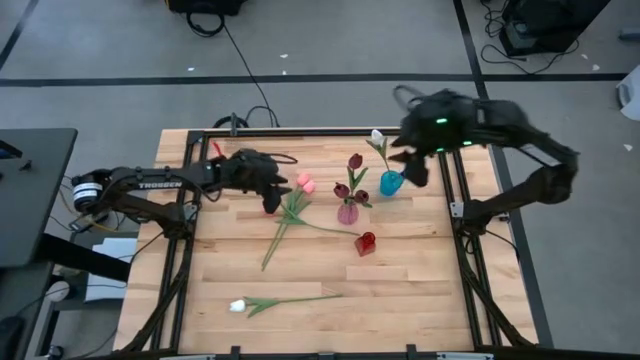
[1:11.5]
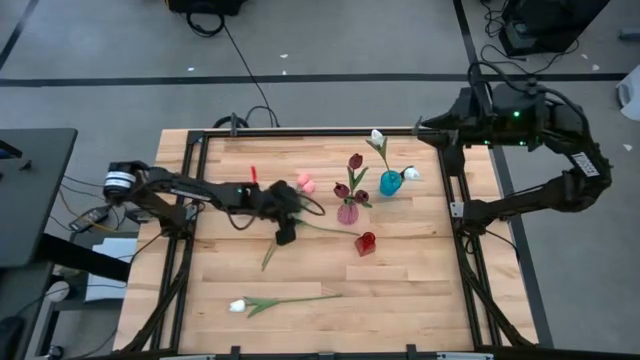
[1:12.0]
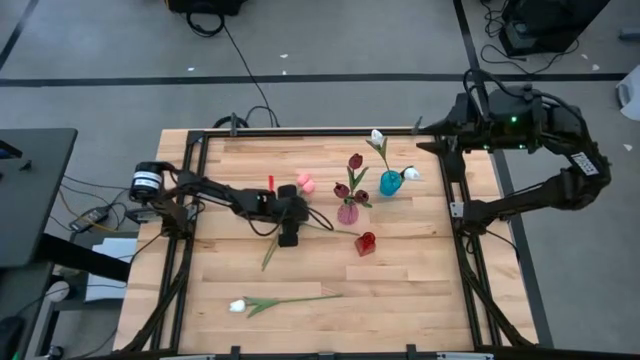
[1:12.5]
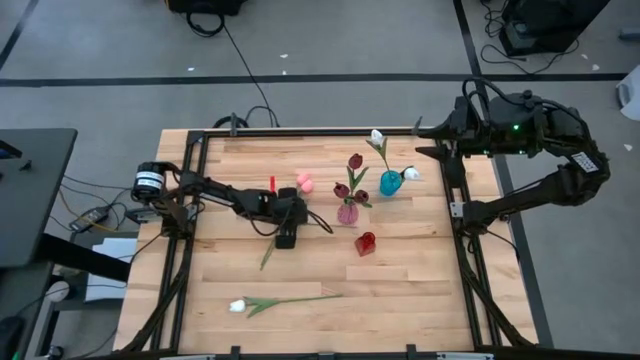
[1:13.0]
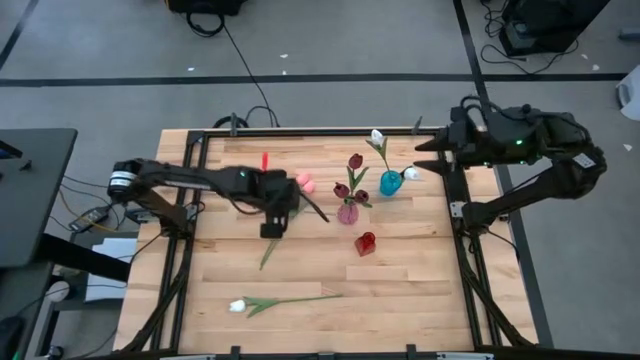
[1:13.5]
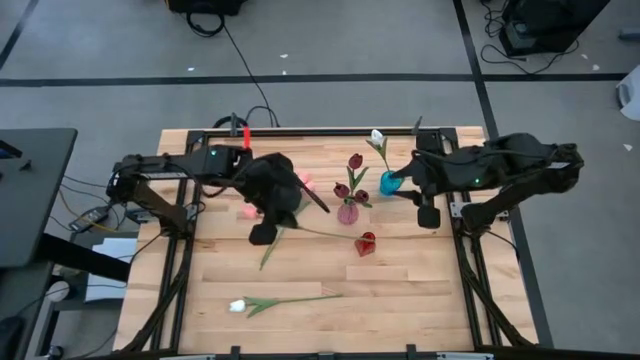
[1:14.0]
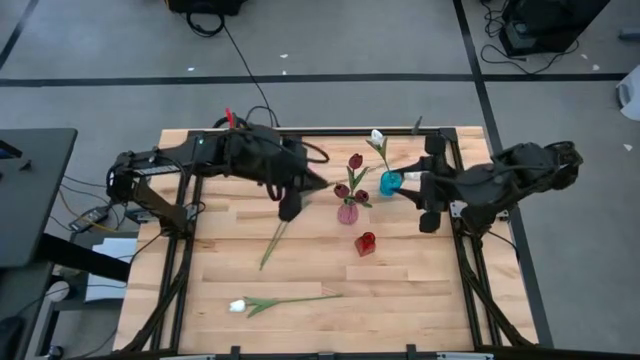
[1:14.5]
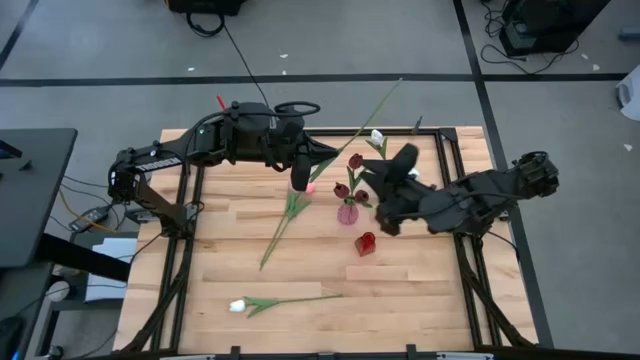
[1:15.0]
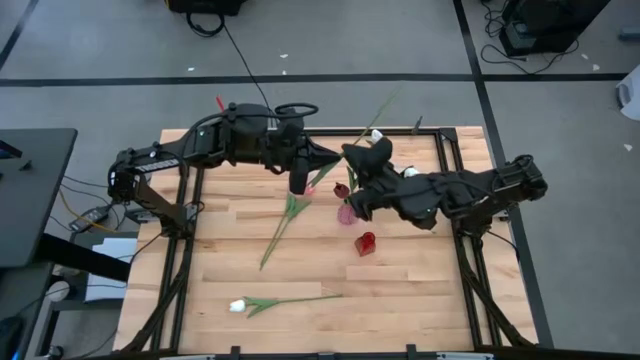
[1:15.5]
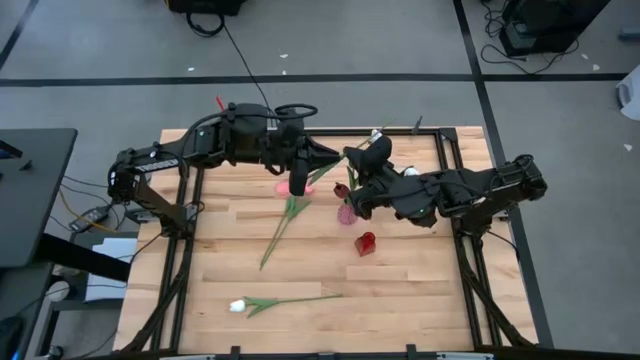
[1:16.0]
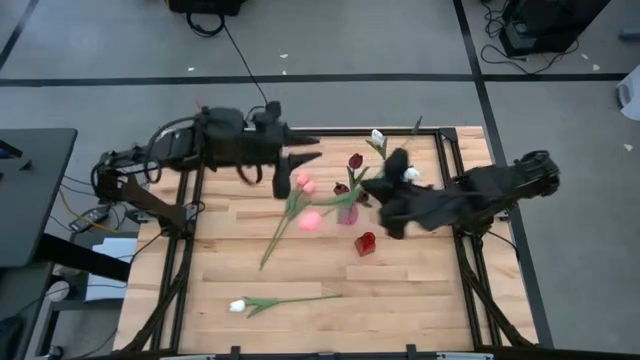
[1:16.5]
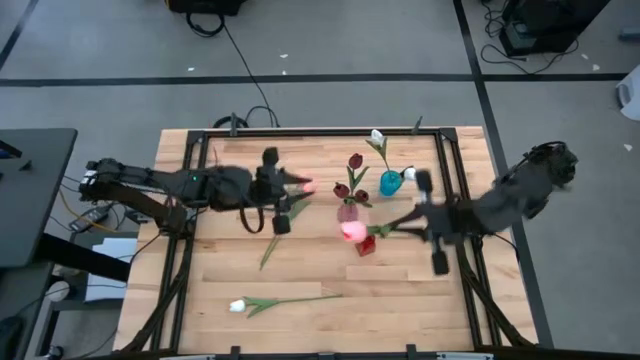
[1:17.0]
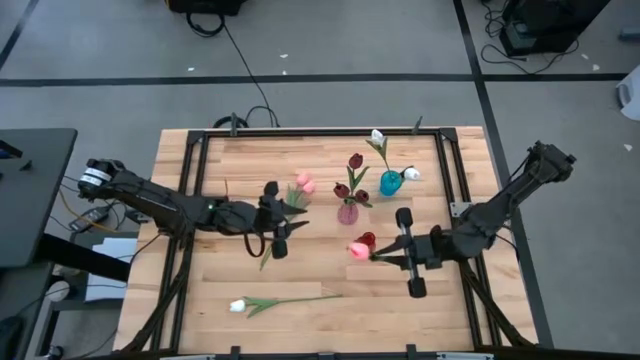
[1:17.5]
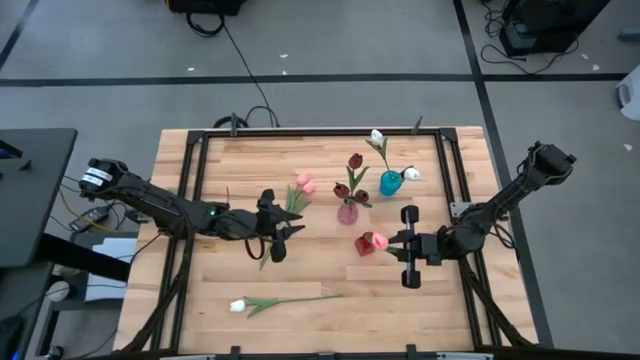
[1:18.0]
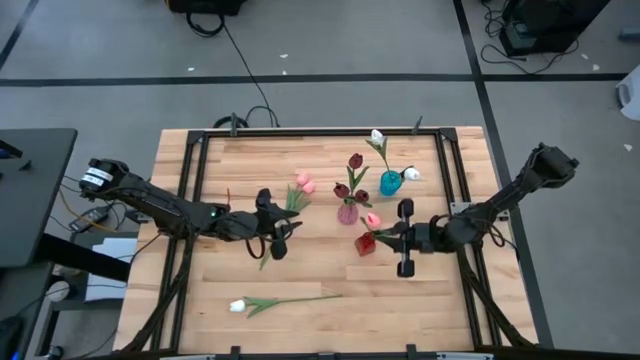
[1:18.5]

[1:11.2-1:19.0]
Task: Sort flowers into vase by color
Put the pink flower into the red vase

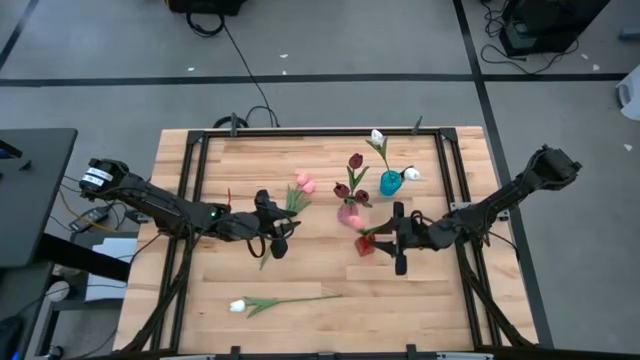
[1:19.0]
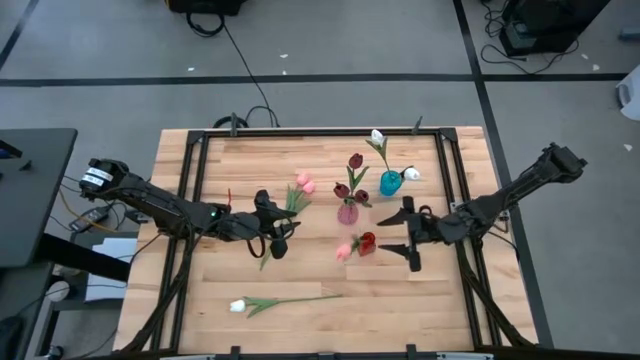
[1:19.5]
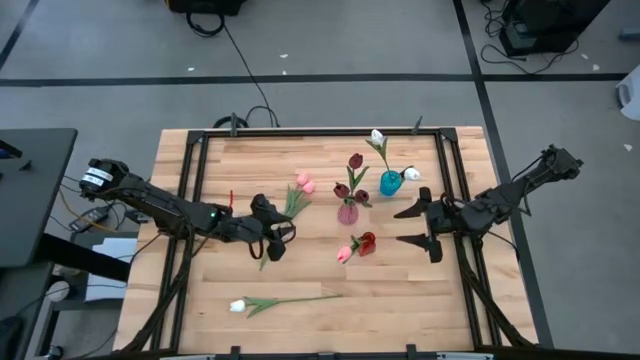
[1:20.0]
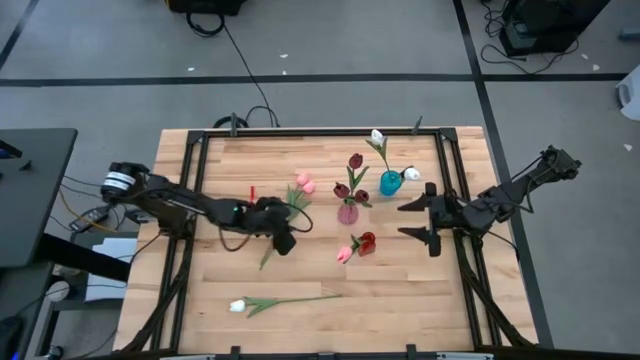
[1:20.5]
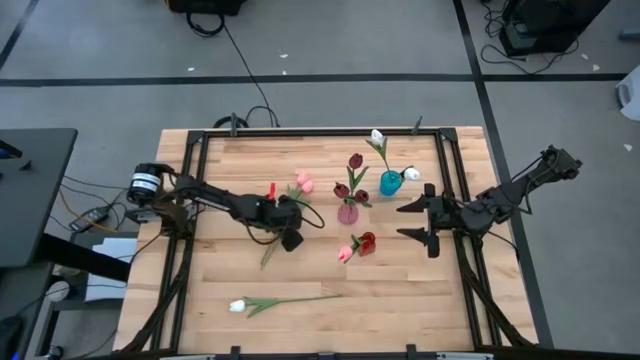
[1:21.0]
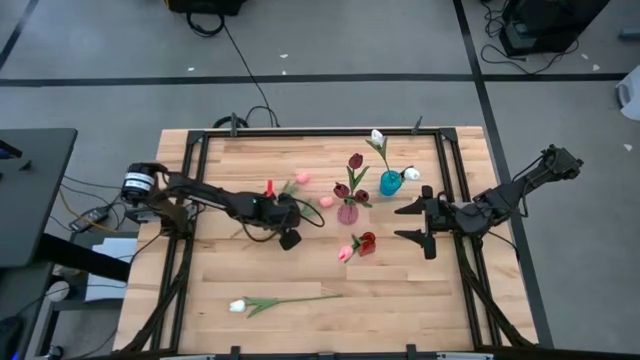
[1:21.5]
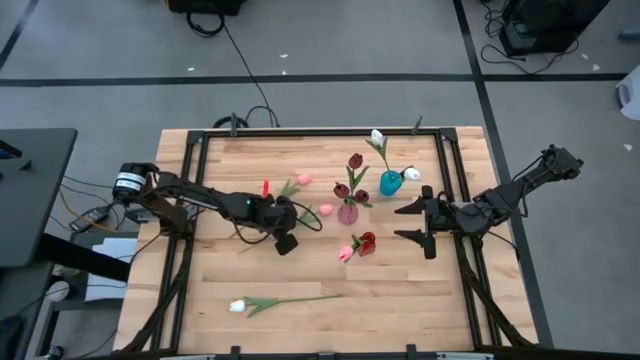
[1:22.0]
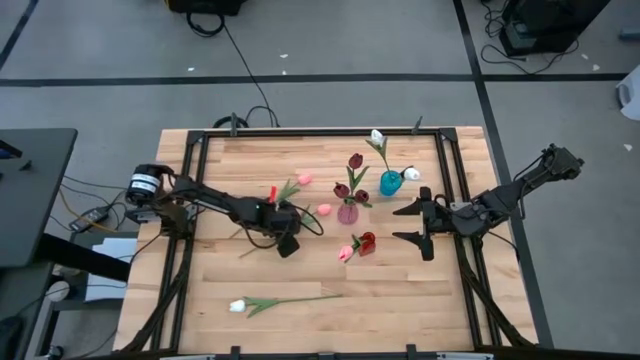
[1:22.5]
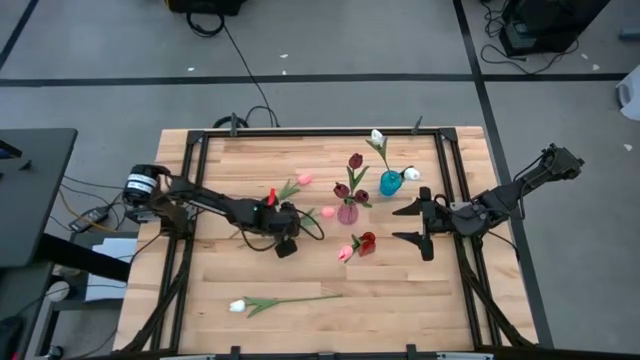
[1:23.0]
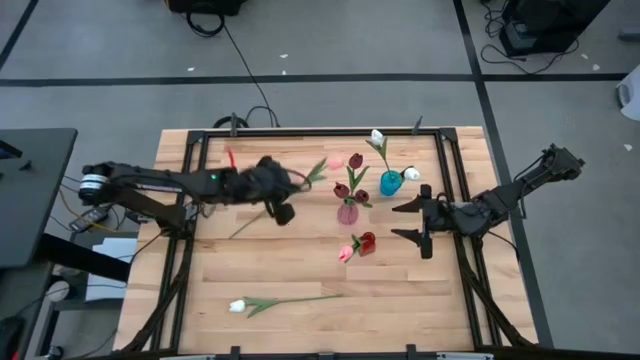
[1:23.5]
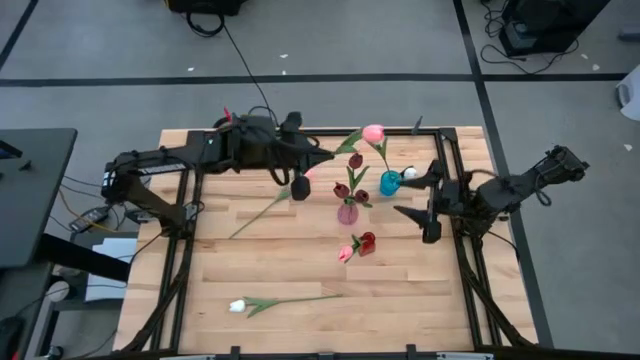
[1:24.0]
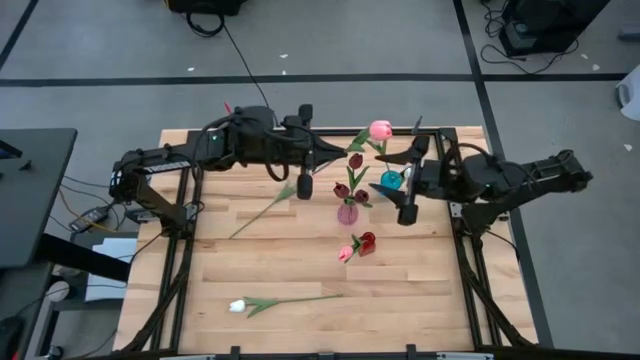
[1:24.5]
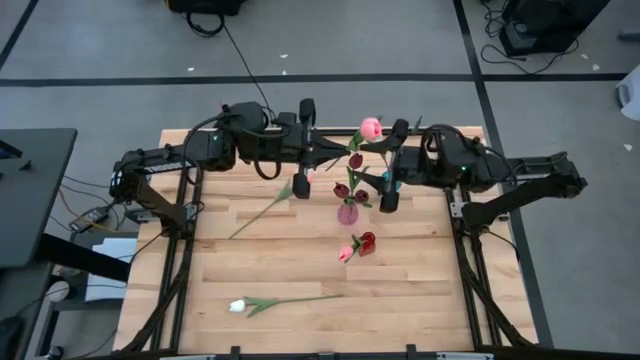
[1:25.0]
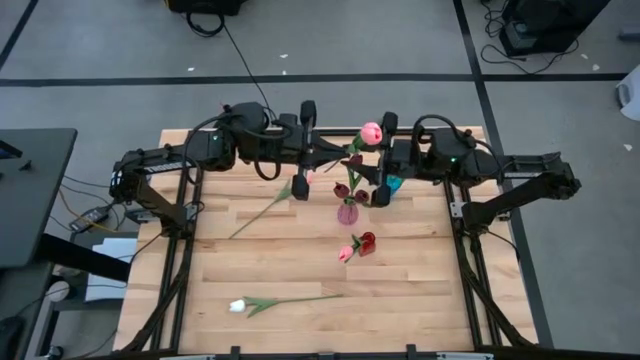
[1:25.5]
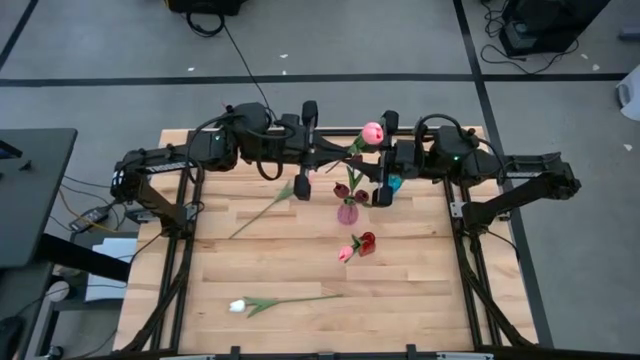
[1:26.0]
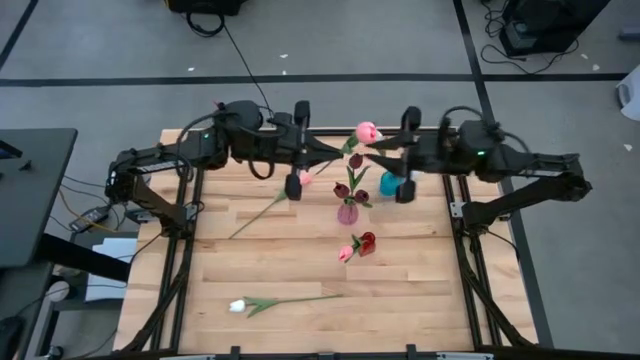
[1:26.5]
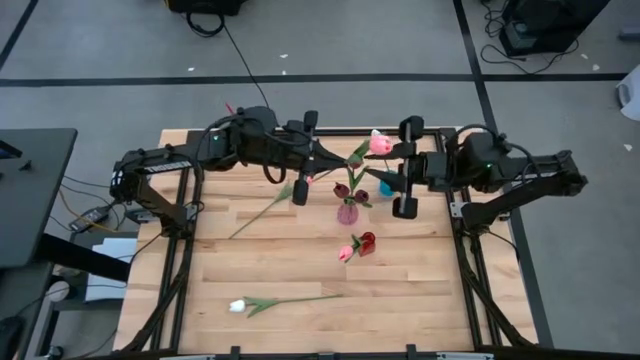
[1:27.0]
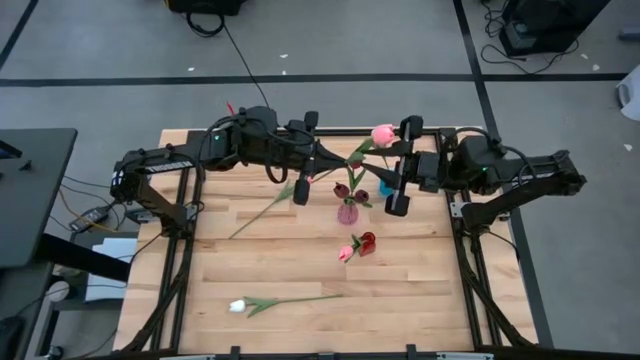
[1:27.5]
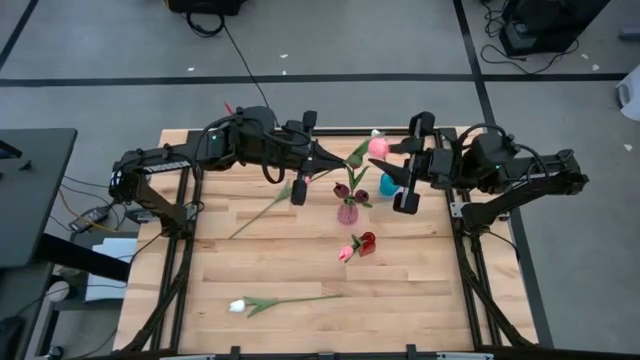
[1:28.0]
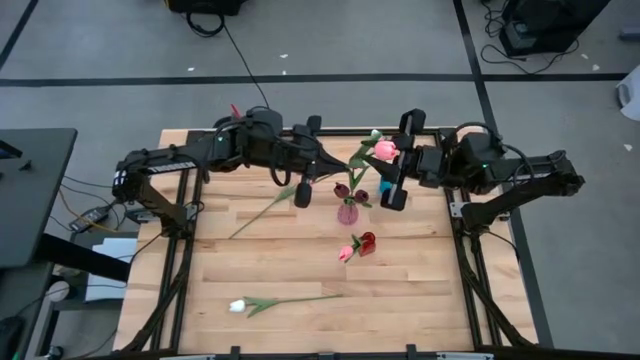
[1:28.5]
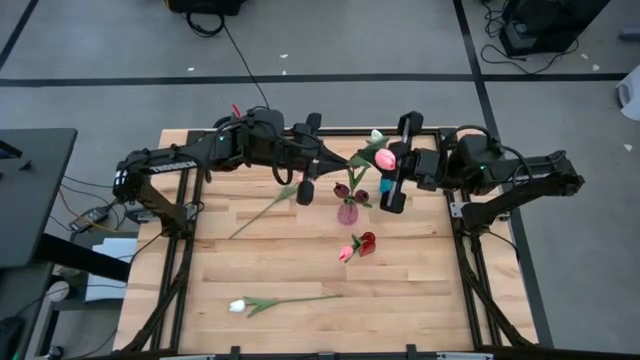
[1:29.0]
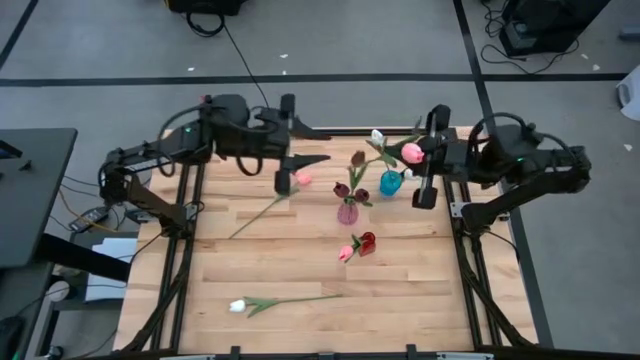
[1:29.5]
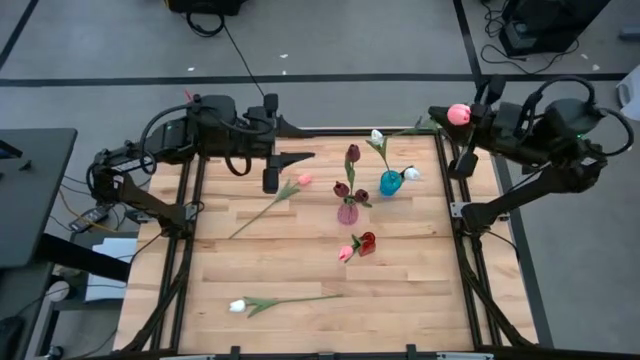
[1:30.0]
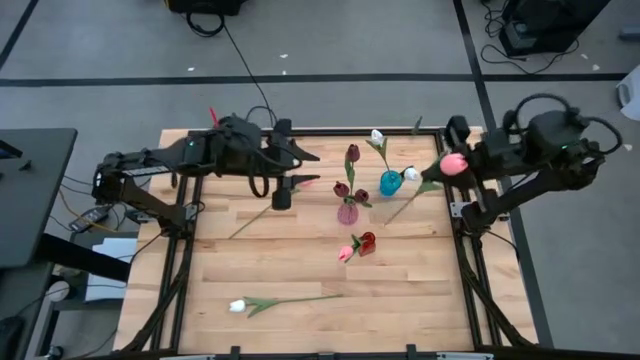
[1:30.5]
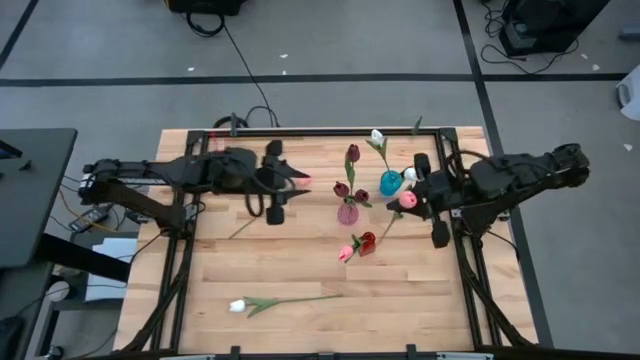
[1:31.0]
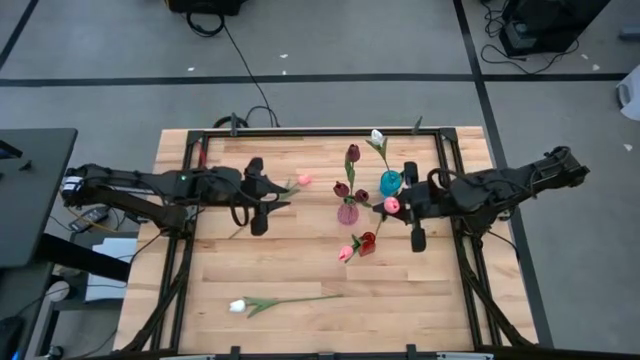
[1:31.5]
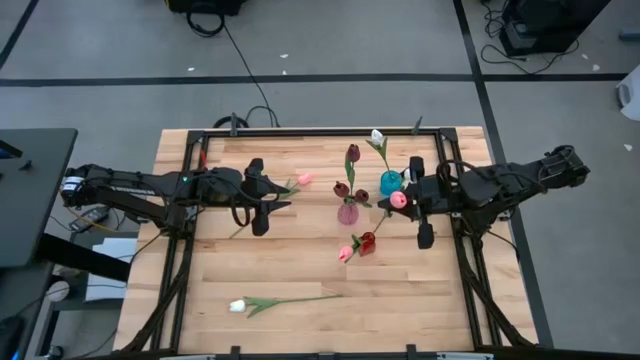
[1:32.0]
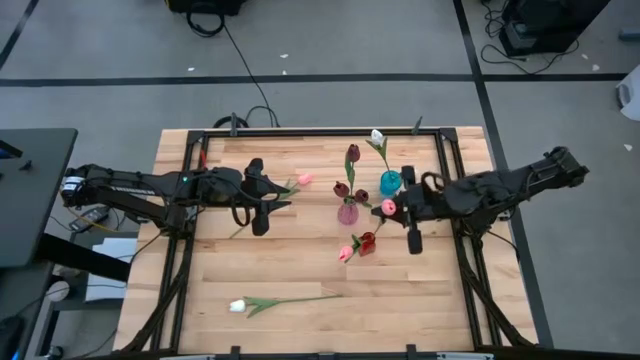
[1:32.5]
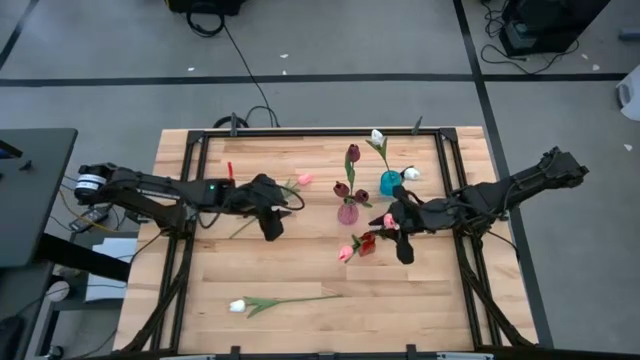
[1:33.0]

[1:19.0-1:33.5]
Put the pink flower into the red vase

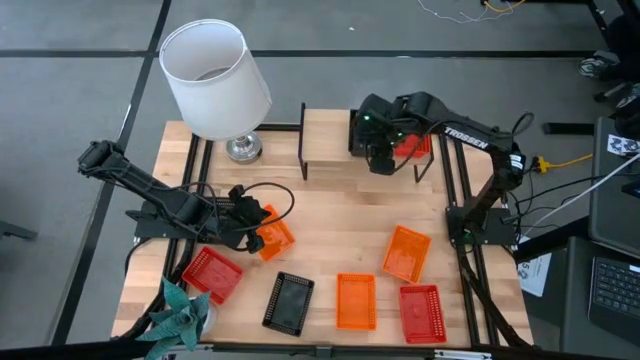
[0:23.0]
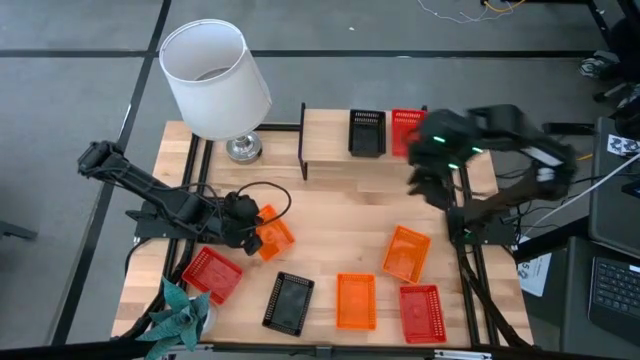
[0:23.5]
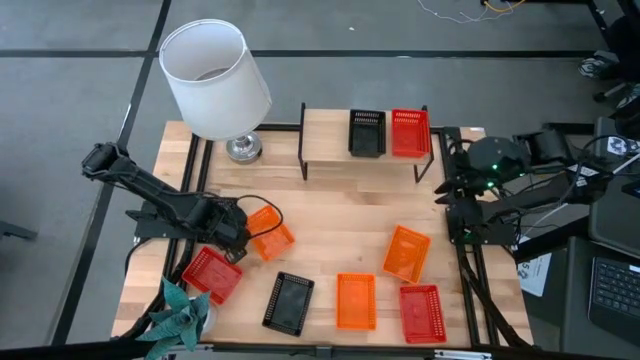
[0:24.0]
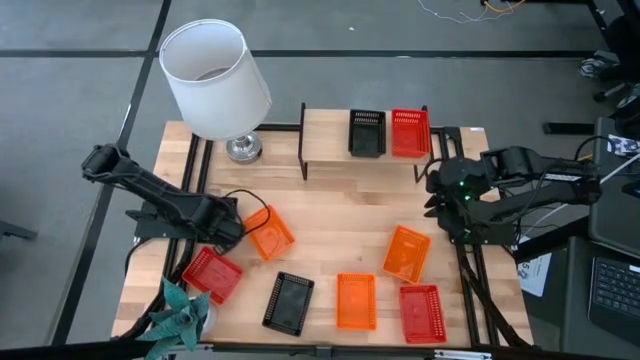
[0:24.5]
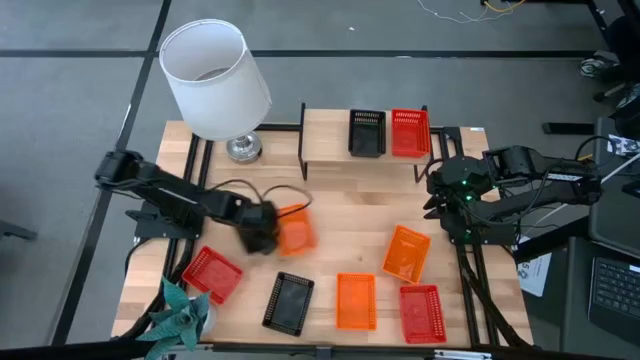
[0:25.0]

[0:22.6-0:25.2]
Task: Stack baskets on shelf by color
Adjust the black bin
